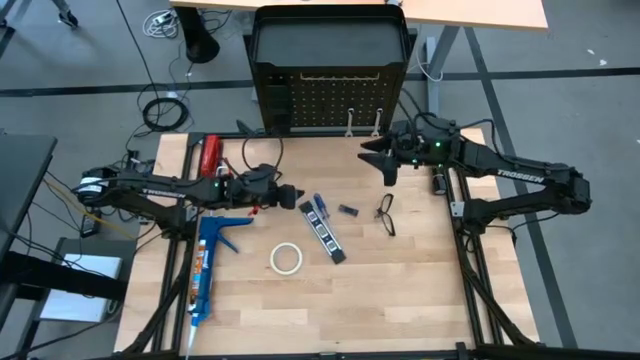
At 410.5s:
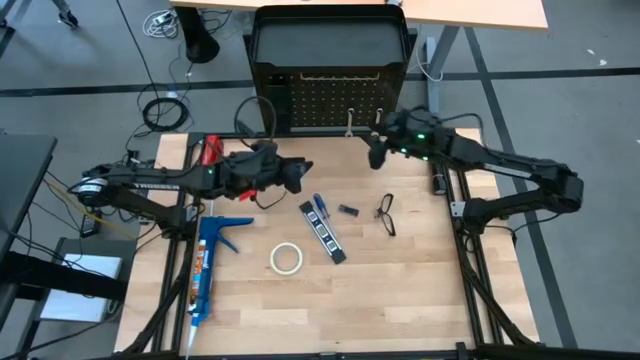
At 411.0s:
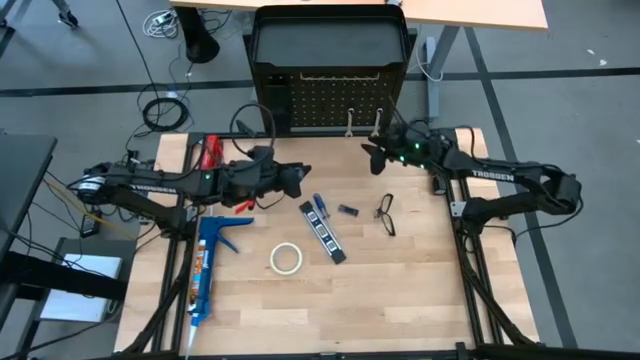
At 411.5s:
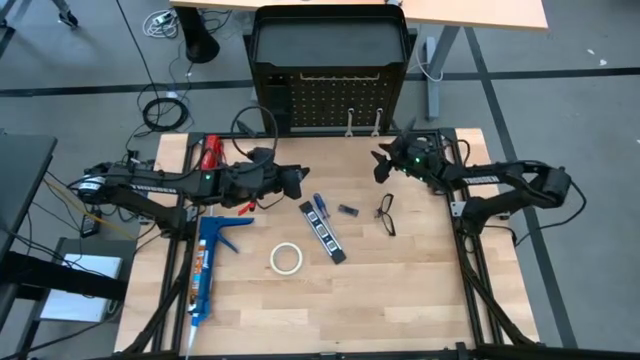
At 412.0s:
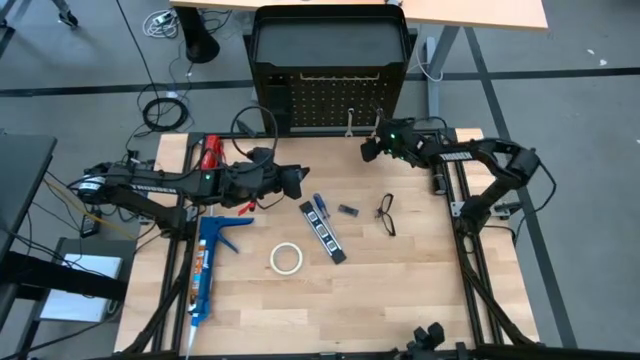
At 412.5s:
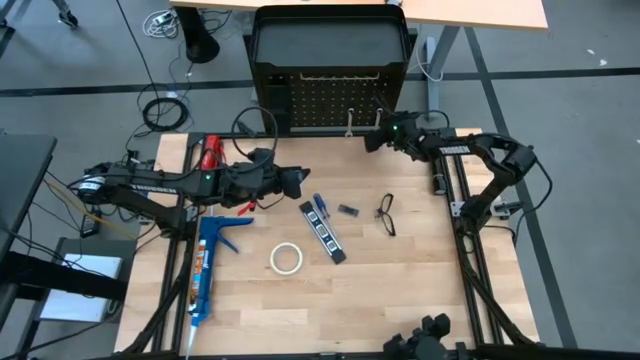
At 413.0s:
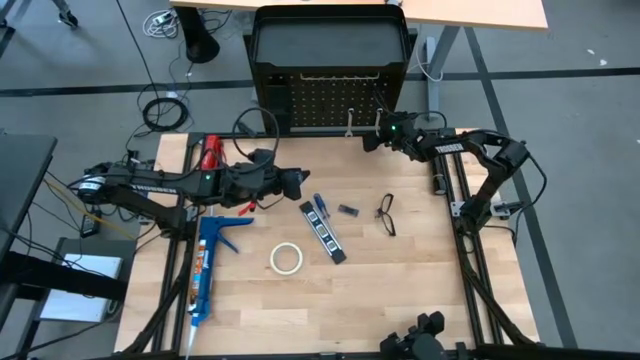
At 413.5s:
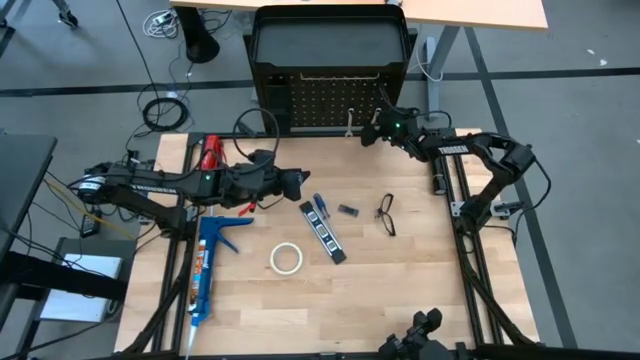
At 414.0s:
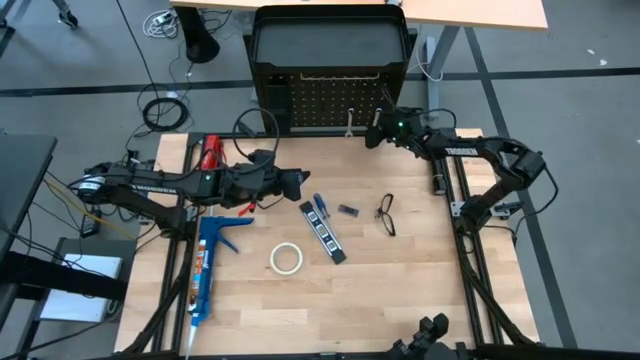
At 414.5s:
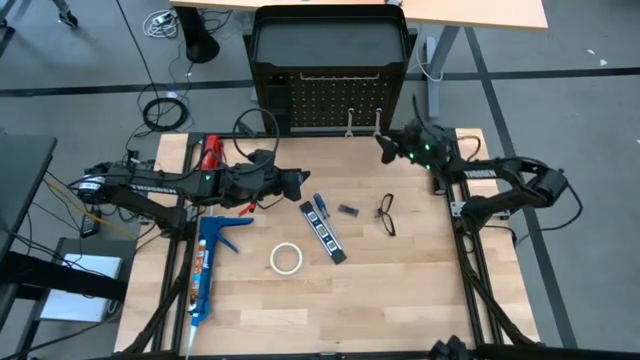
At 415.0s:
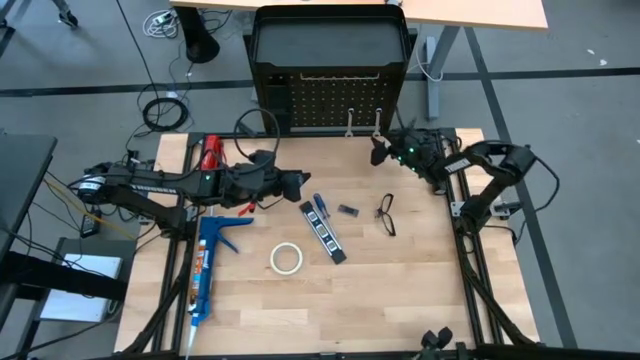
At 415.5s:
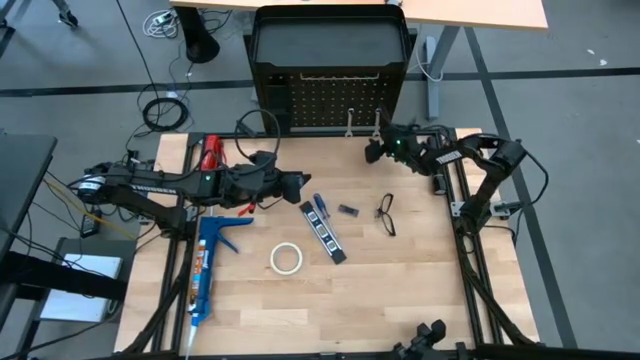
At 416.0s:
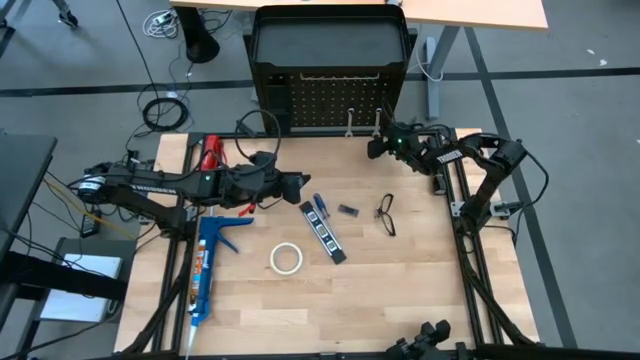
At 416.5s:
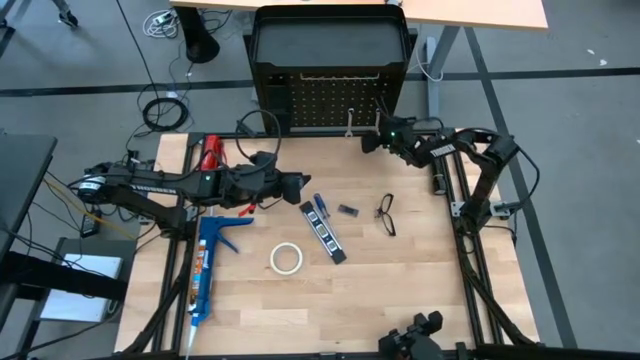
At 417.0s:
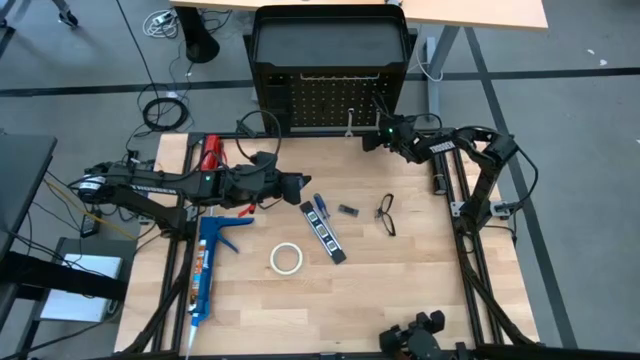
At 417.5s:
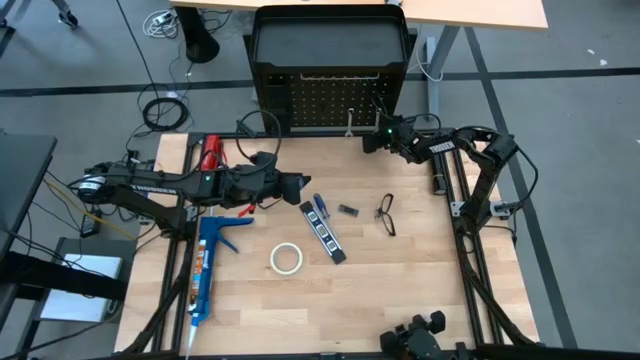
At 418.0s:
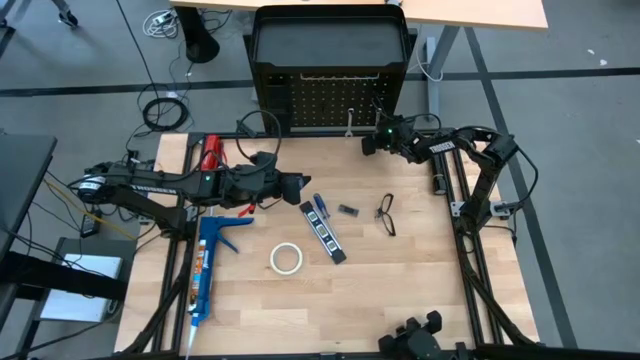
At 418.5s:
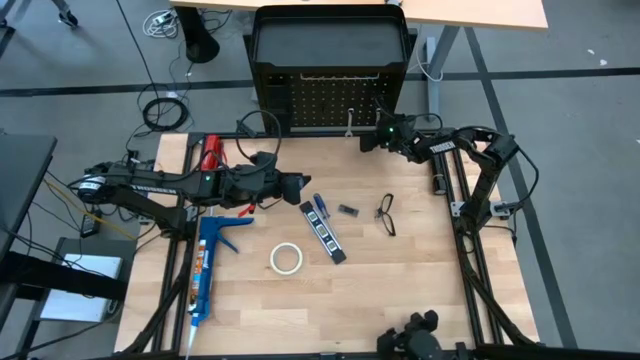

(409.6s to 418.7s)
Task: Hang tools onto peg board
Unhang the right wrench from the black pegboard

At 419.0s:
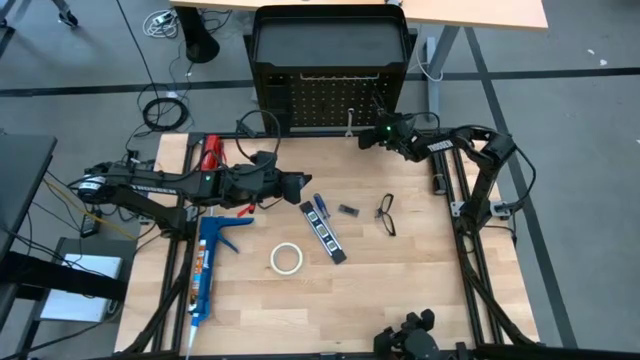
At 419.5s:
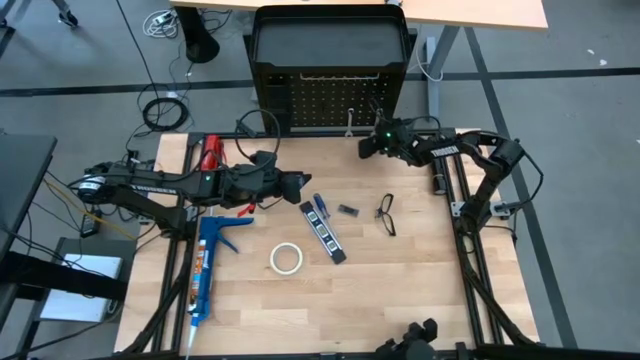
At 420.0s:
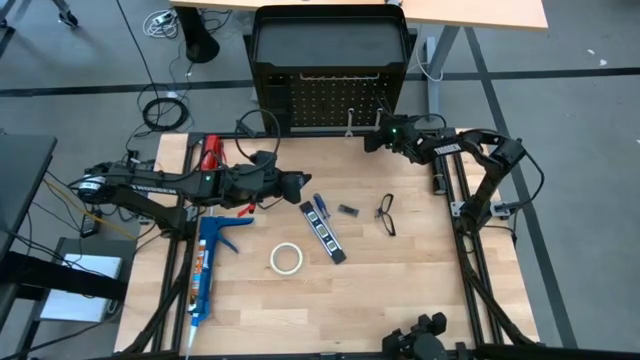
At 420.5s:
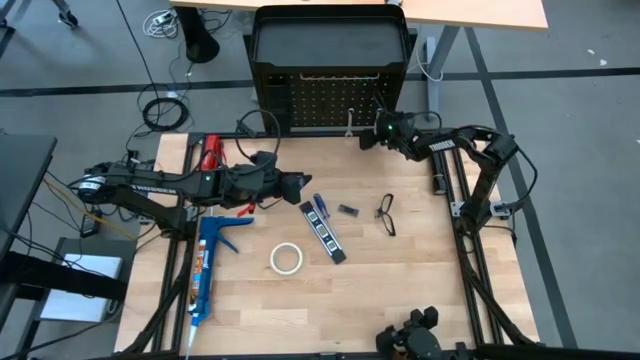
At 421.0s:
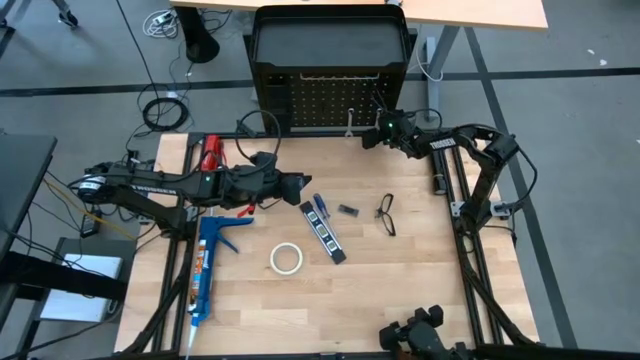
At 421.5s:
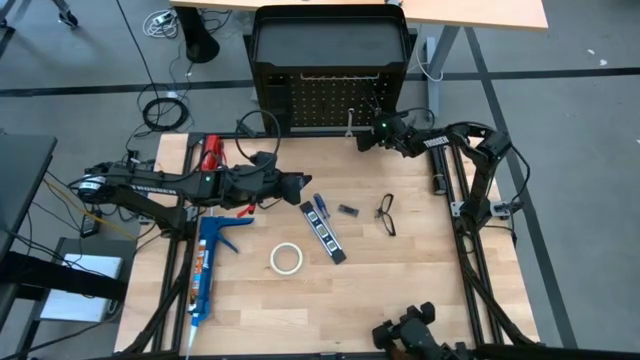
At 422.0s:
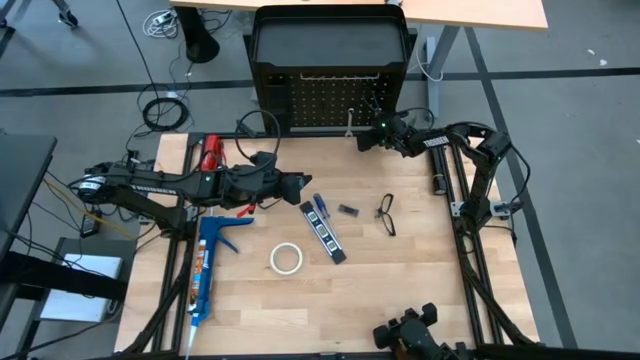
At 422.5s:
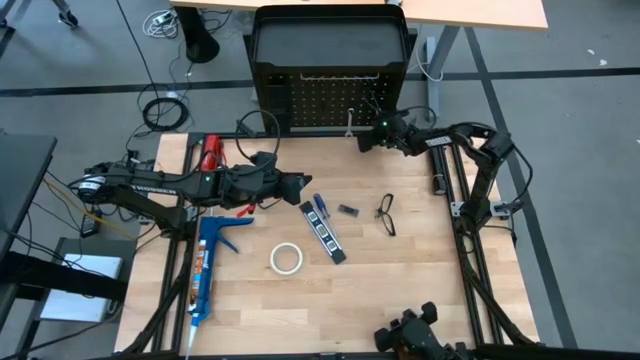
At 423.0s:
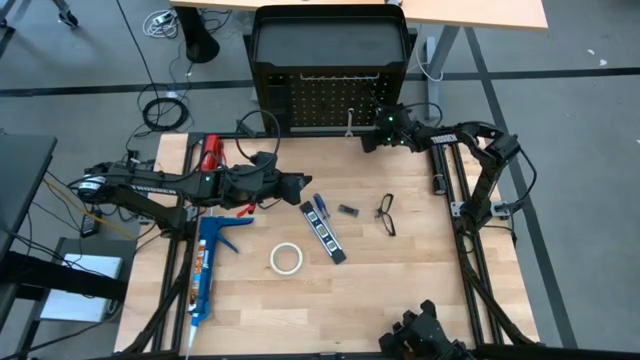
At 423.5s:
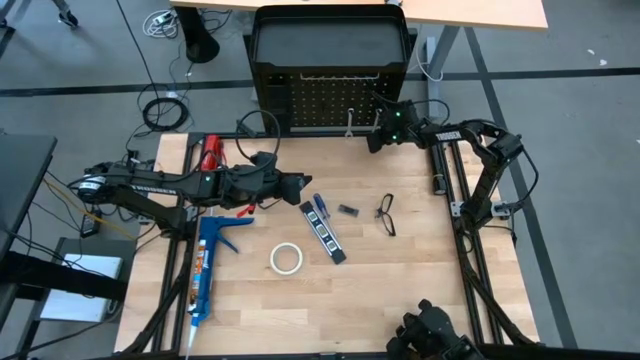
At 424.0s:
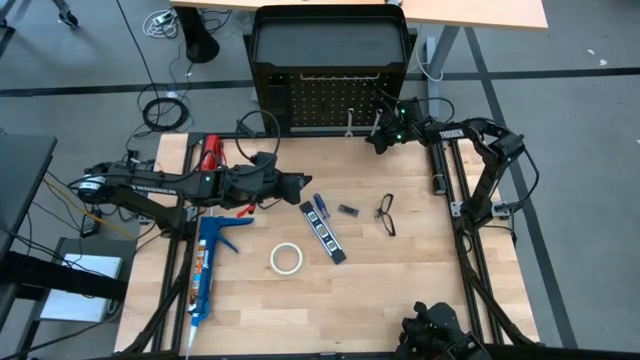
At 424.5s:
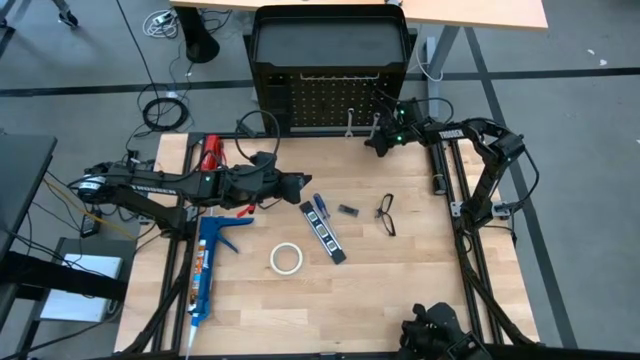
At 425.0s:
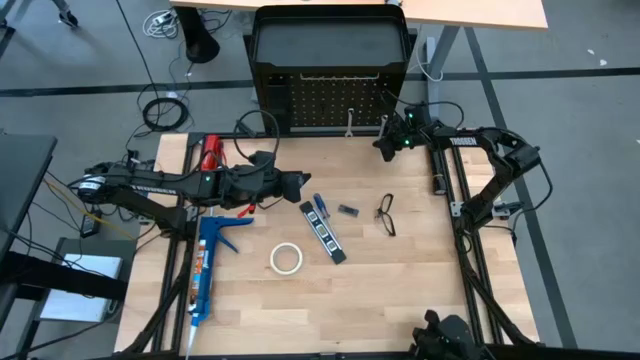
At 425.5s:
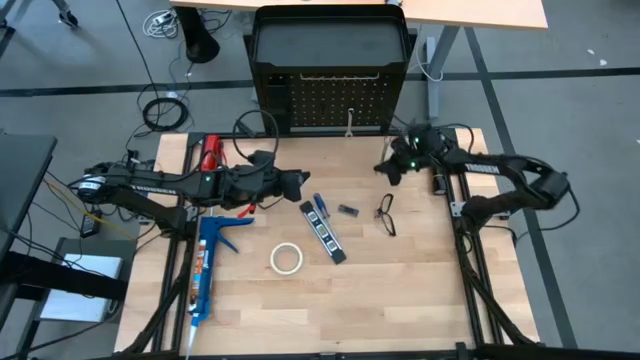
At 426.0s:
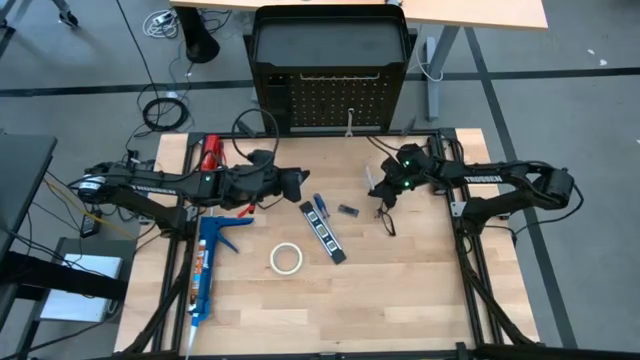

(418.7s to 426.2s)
Unhang the right wrench from the black pegboard

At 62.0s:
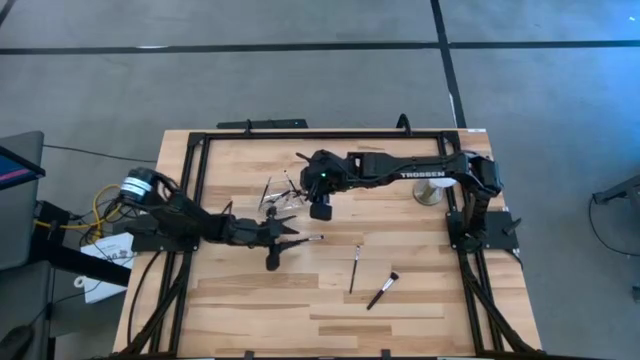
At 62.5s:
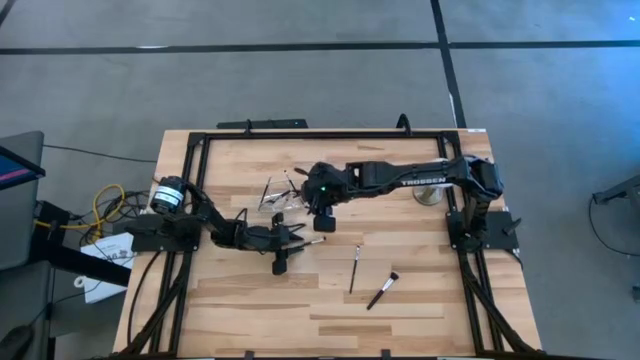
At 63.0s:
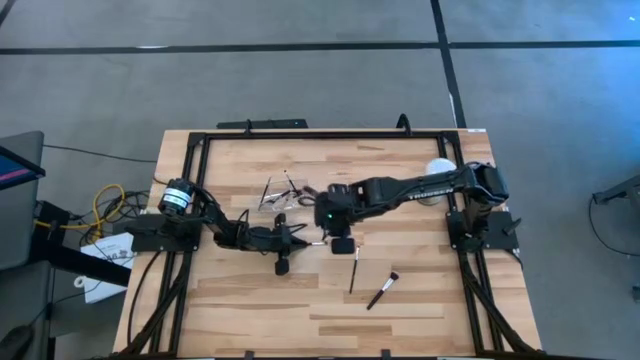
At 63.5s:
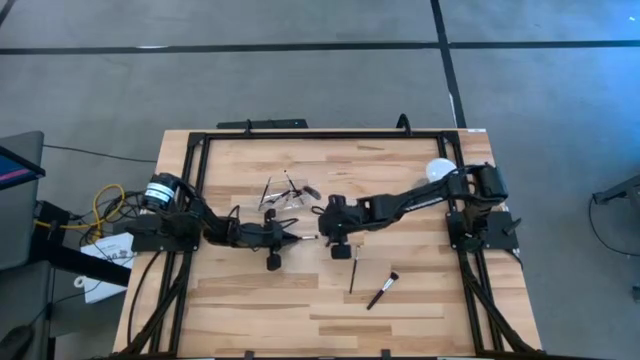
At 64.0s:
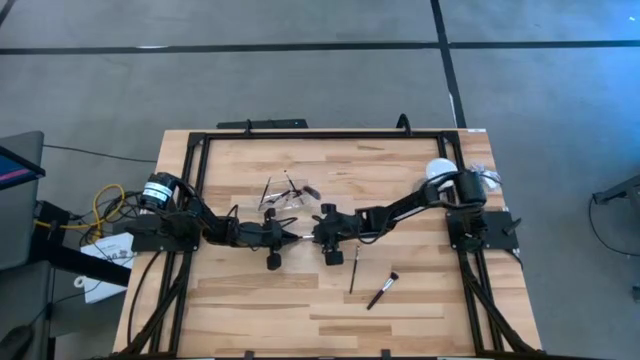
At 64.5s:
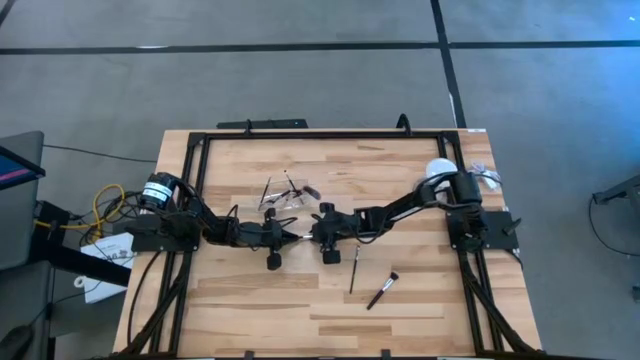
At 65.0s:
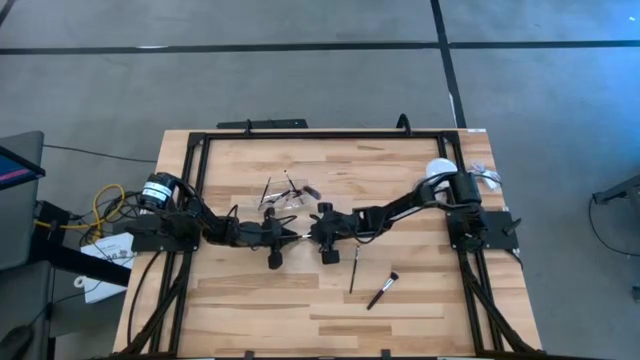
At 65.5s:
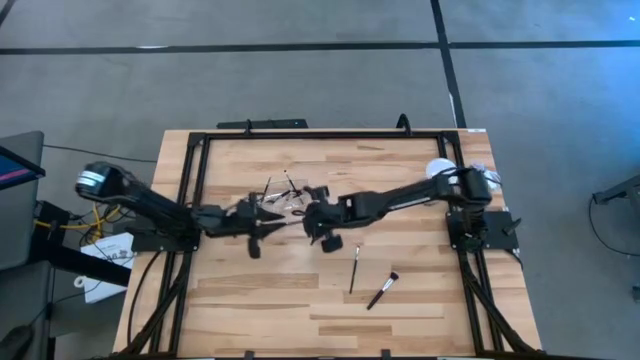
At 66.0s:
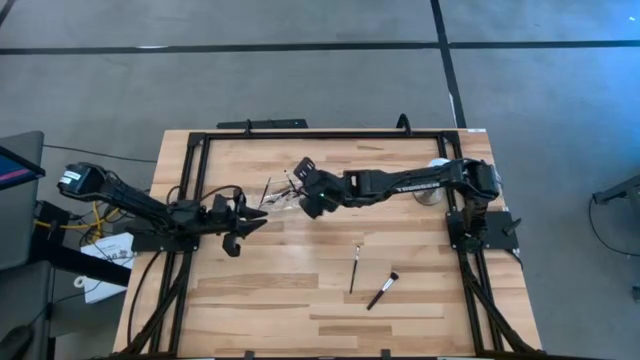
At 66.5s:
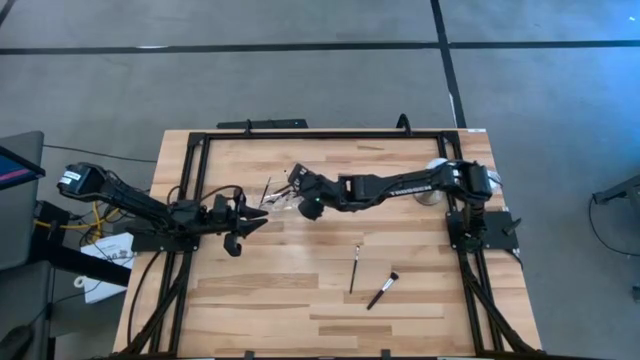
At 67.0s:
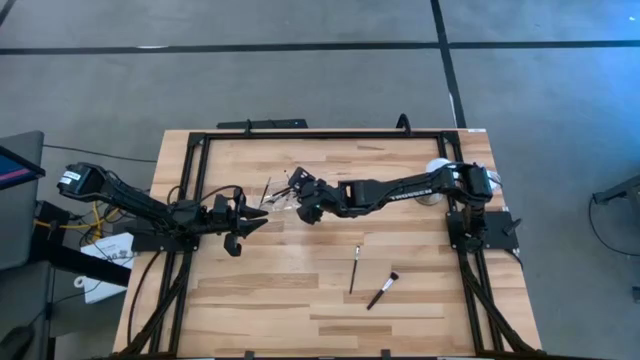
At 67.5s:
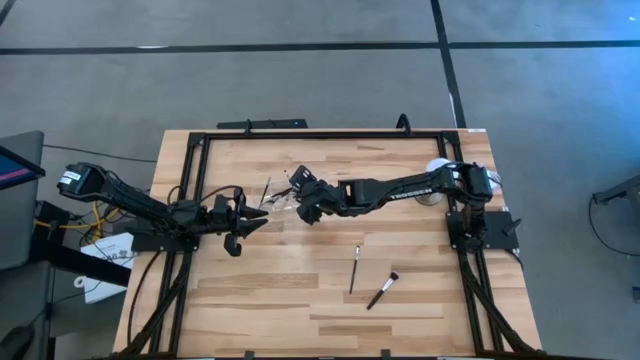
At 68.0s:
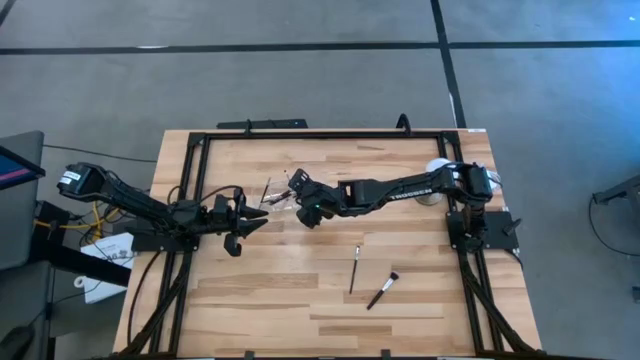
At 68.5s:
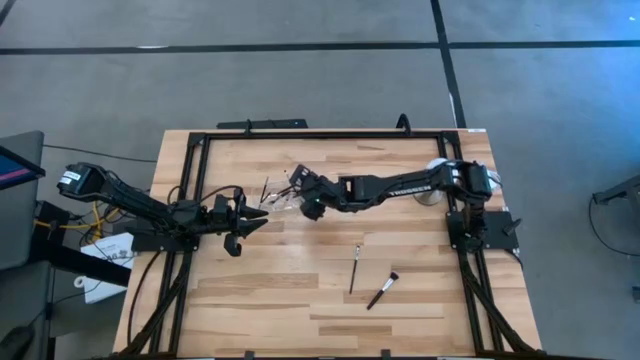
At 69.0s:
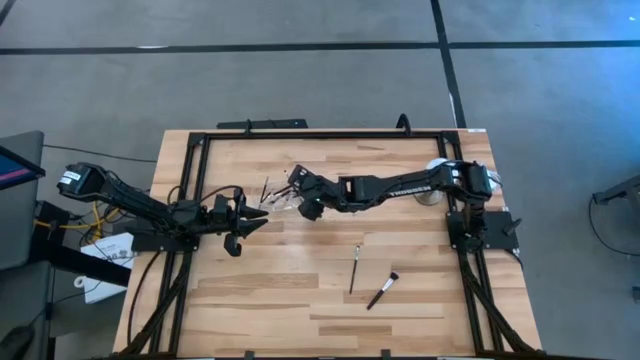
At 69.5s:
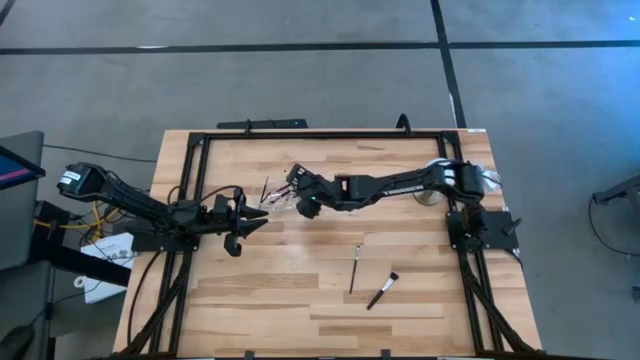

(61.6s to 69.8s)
Task: Put items in baskets/containers
Put the eyeshadow brush into the transparent organizer
